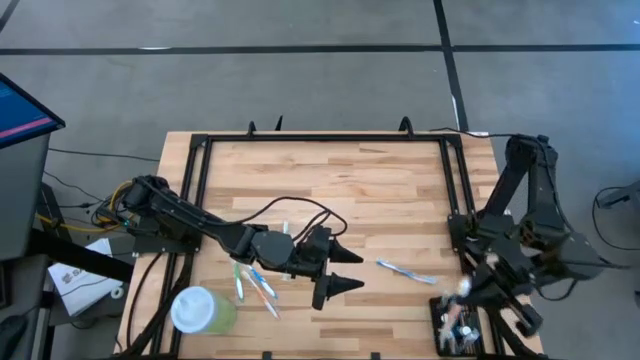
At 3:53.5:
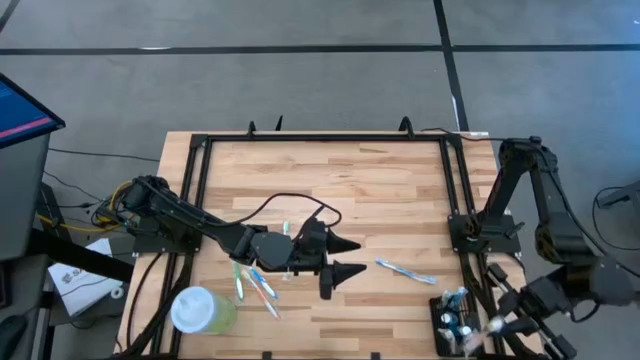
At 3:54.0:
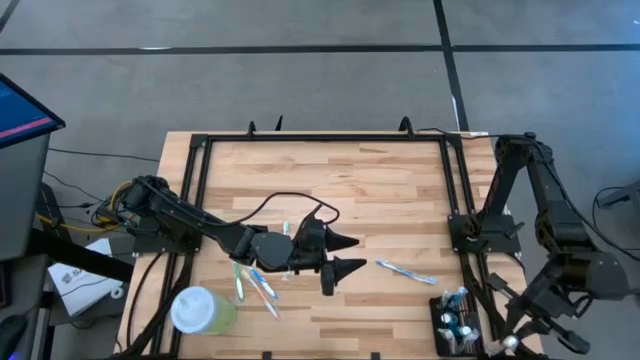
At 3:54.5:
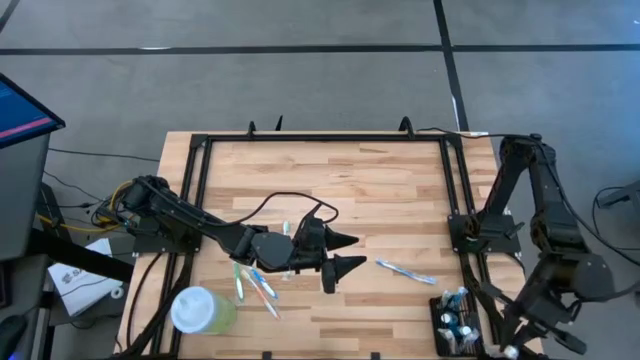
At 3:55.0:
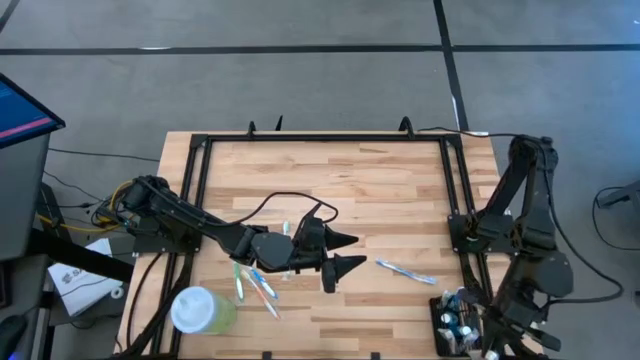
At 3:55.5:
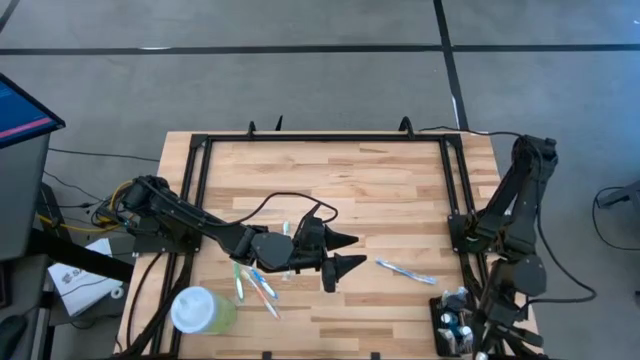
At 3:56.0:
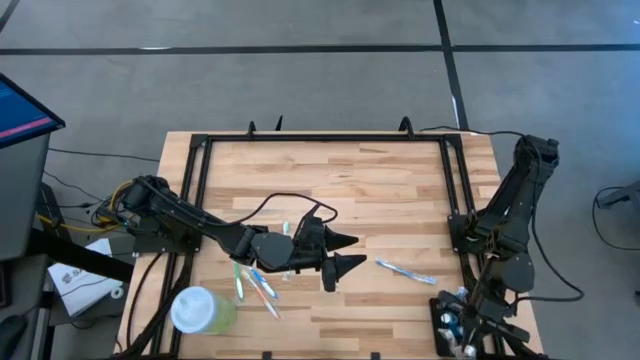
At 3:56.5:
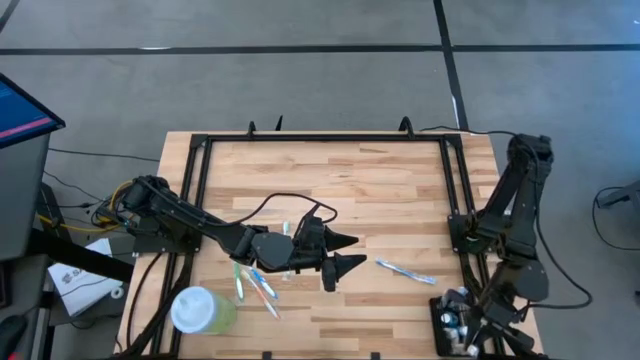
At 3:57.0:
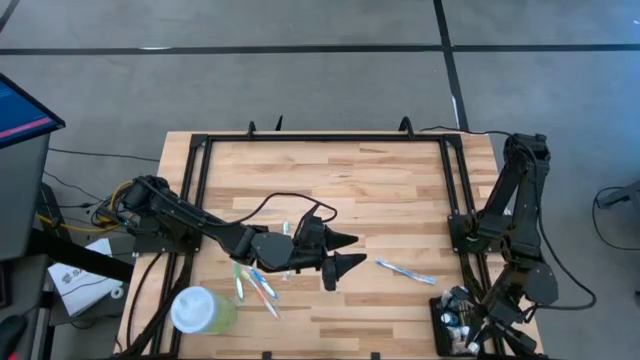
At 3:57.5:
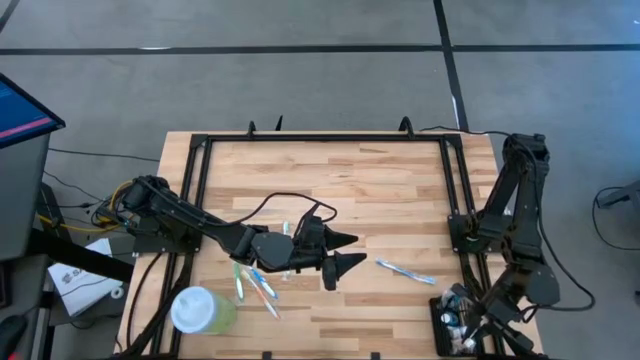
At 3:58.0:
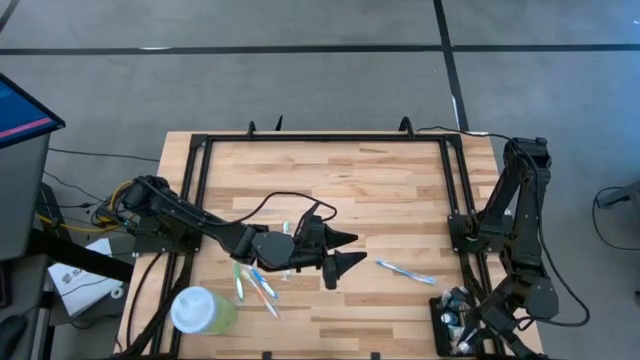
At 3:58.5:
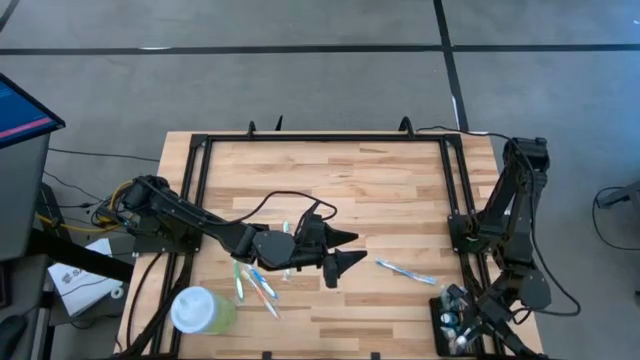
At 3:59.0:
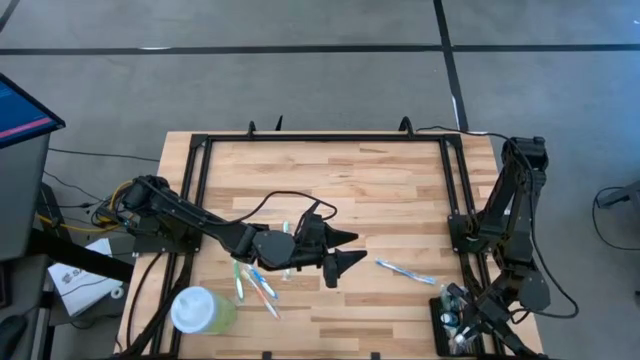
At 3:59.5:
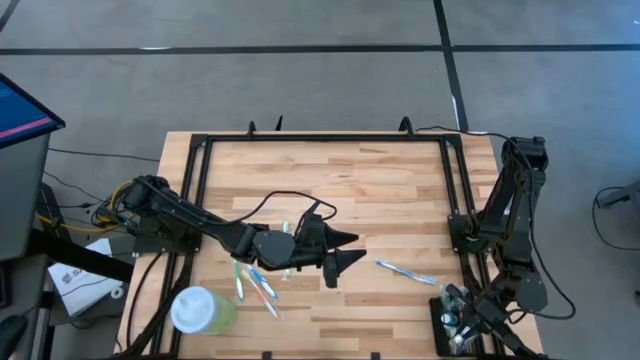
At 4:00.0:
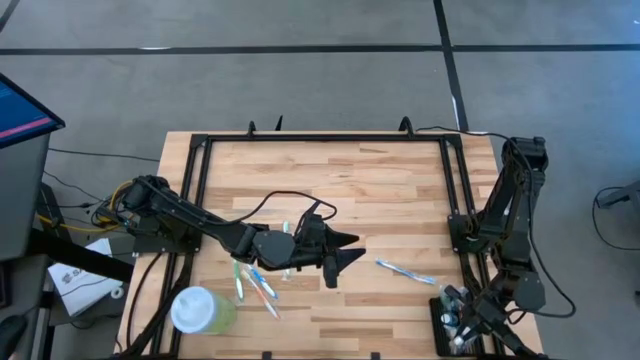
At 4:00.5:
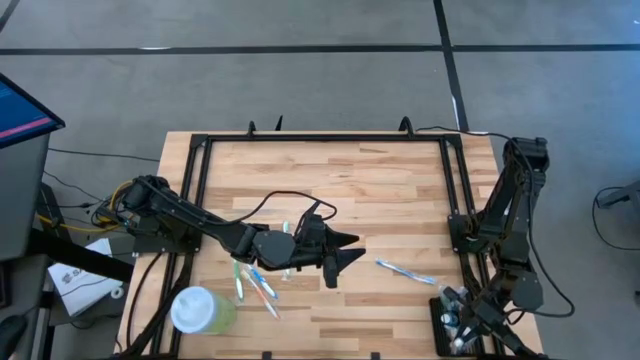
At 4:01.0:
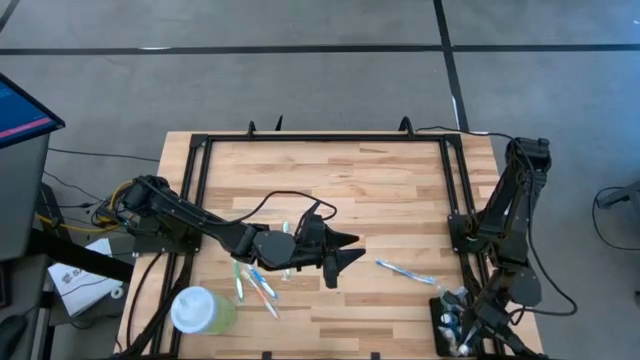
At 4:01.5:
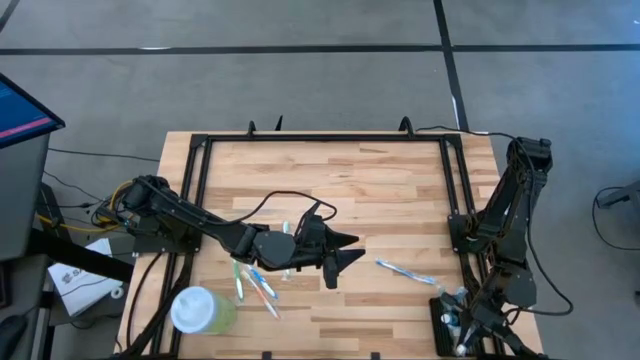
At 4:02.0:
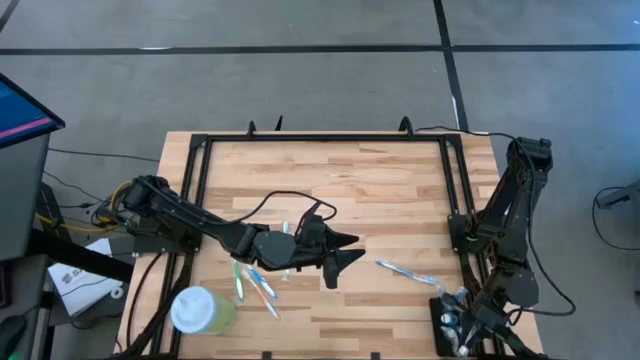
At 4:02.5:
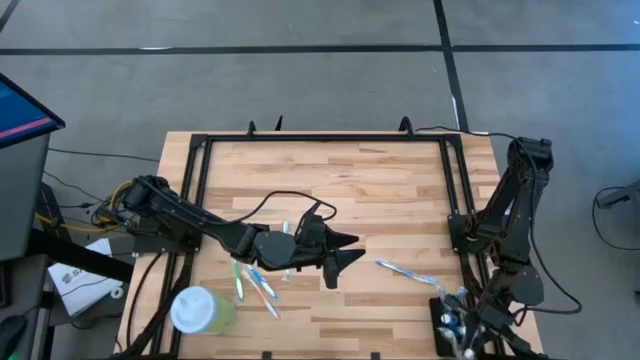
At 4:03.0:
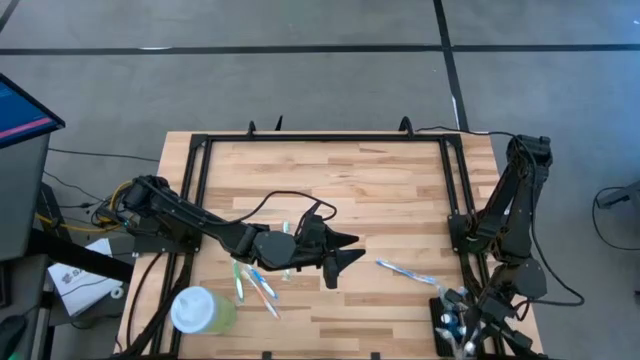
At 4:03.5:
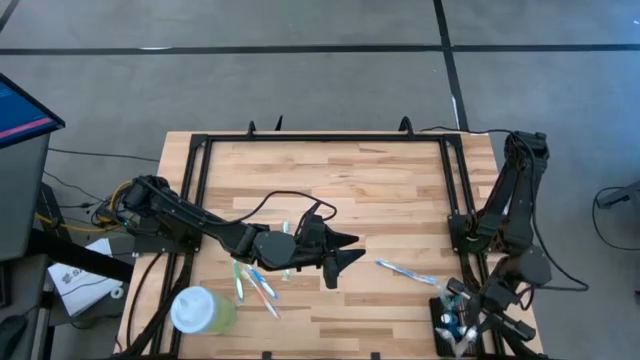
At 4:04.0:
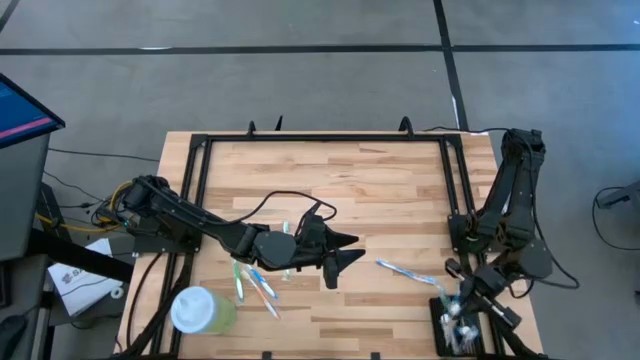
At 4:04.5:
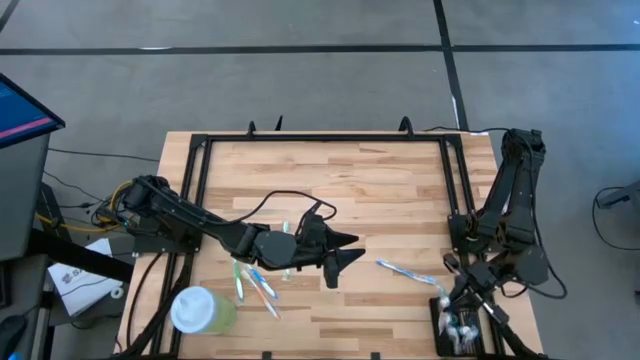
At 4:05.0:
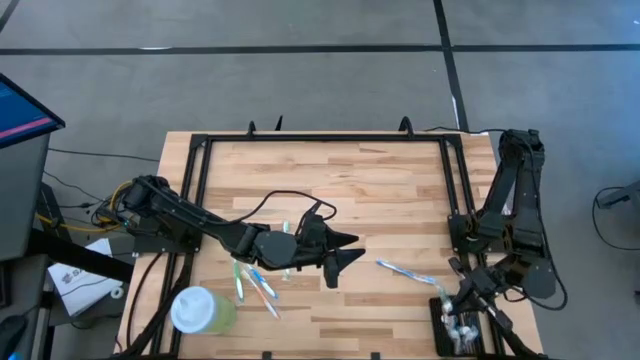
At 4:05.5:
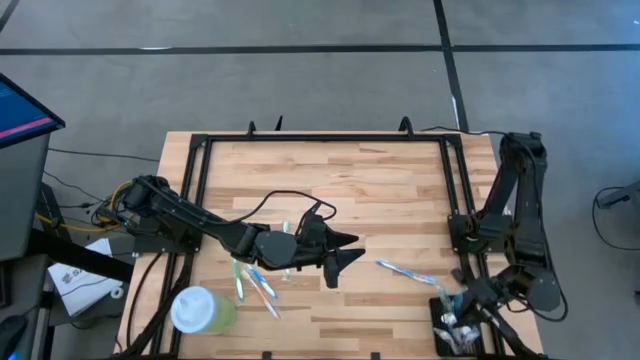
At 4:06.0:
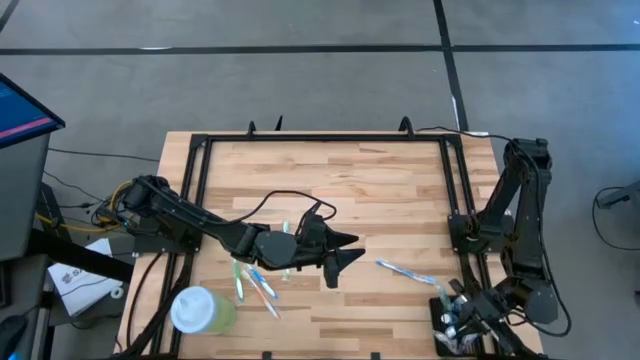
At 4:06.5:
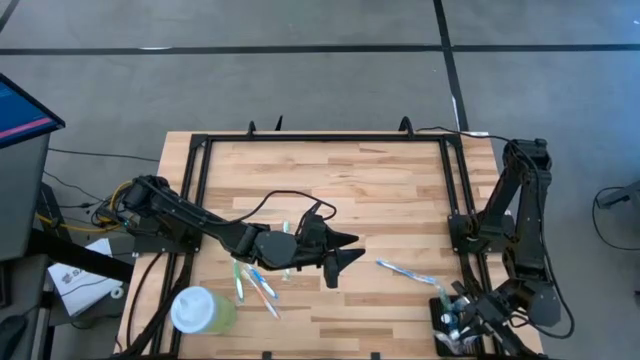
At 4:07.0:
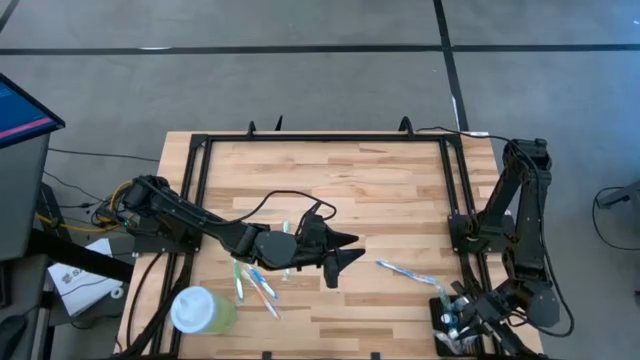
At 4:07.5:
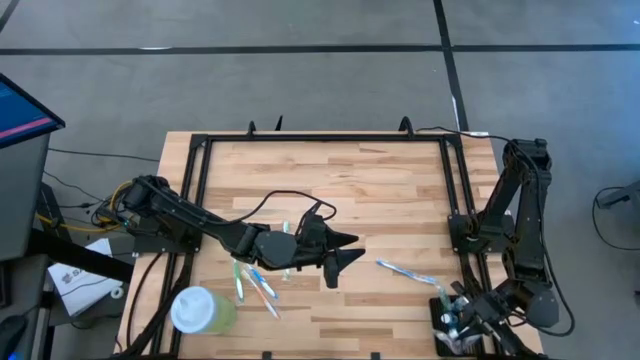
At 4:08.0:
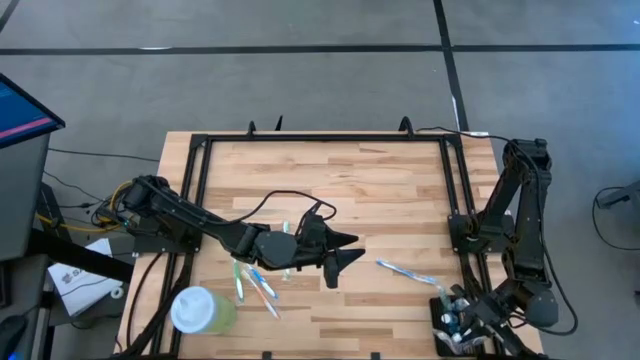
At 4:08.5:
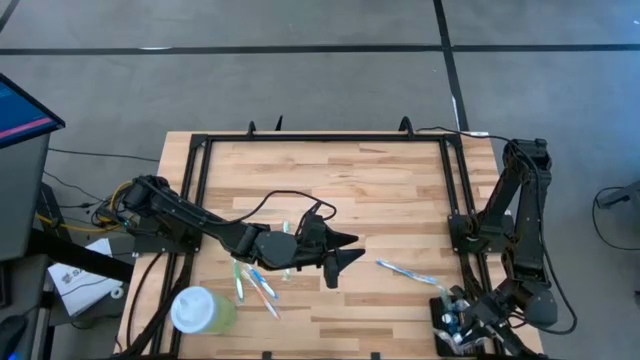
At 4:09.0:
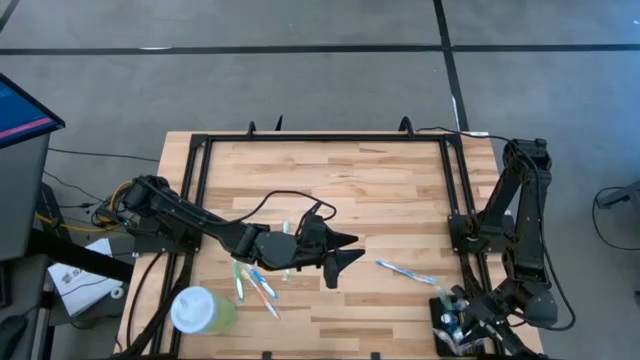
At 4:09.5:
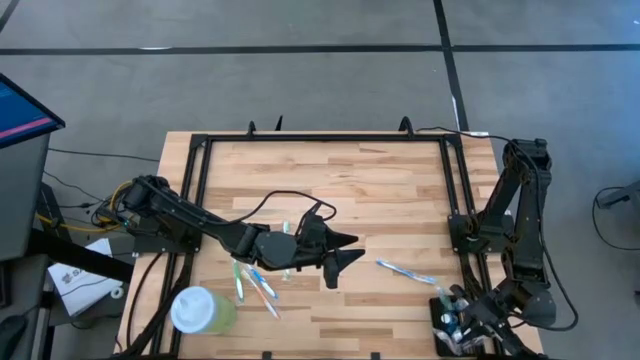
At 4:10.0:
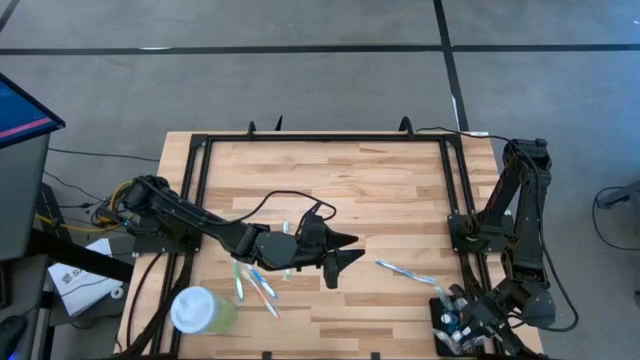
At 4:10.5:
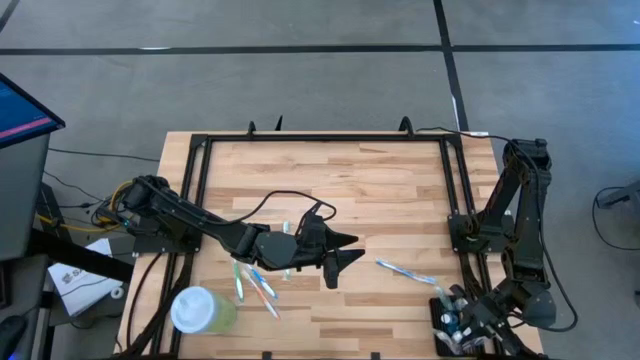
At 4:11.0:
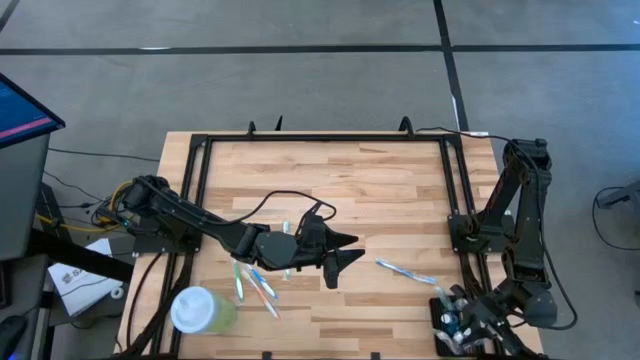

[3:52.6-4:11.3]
Task: Pick & Place toothbrushing station
Put the top orange toothbrush into the black organizer

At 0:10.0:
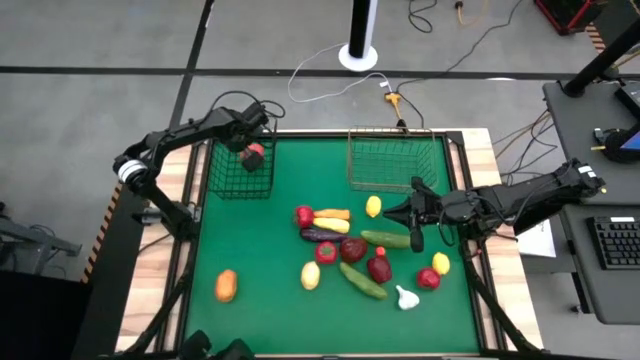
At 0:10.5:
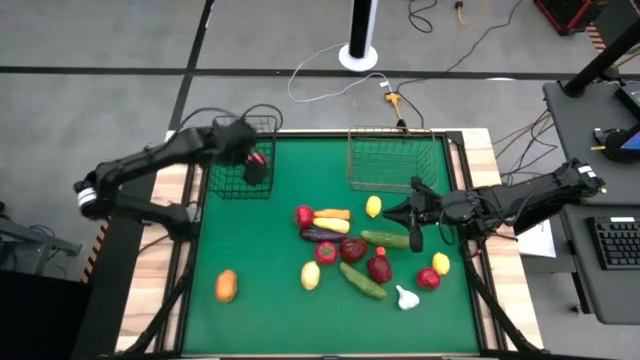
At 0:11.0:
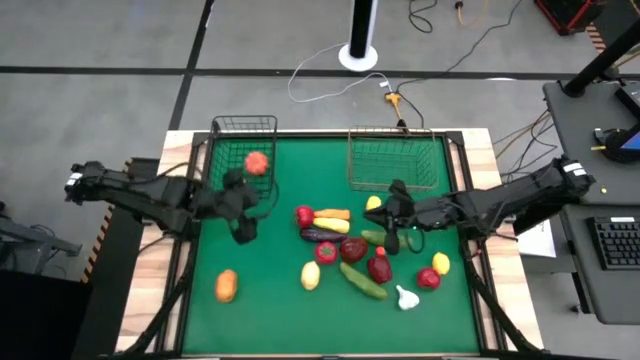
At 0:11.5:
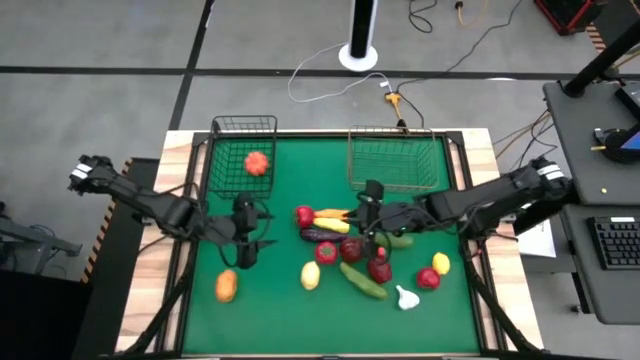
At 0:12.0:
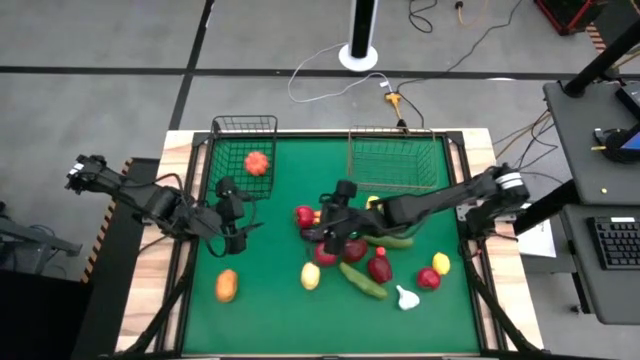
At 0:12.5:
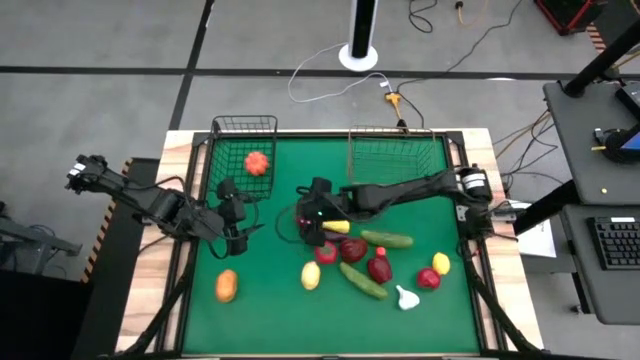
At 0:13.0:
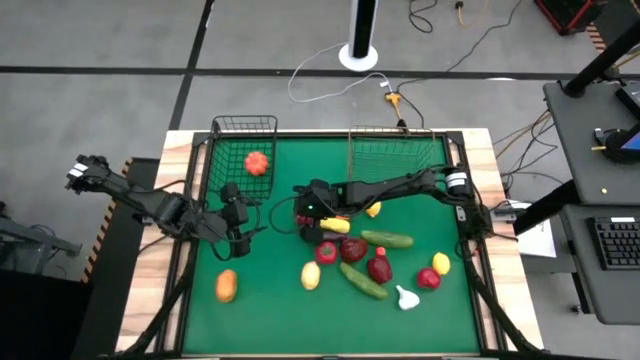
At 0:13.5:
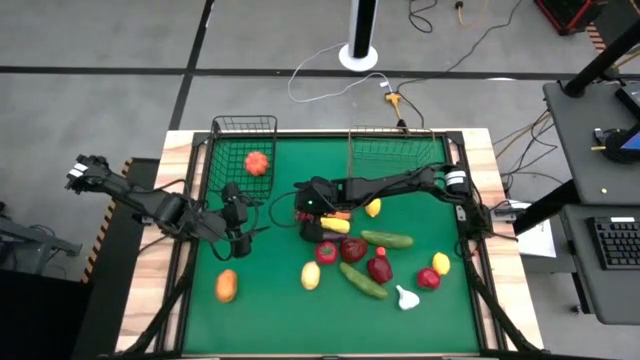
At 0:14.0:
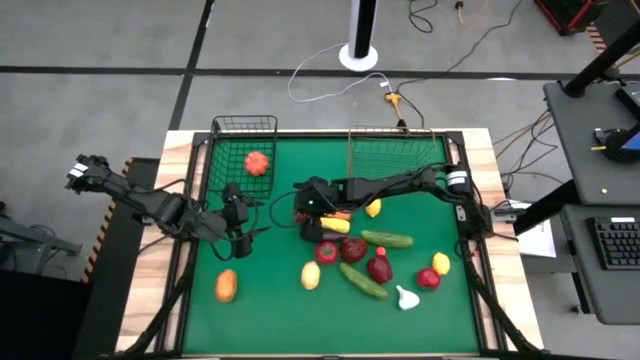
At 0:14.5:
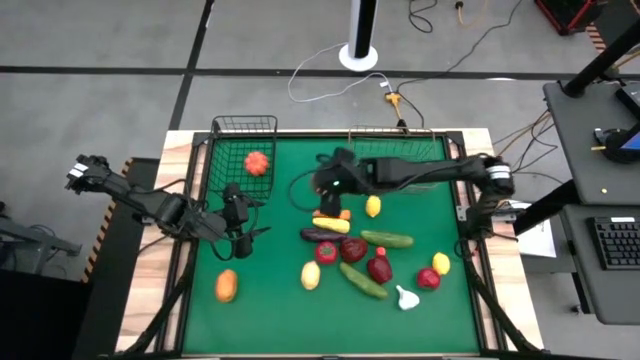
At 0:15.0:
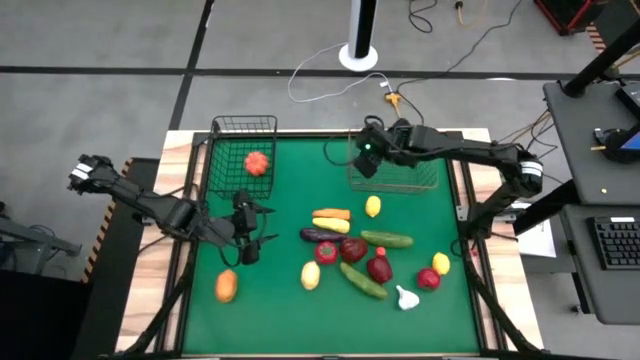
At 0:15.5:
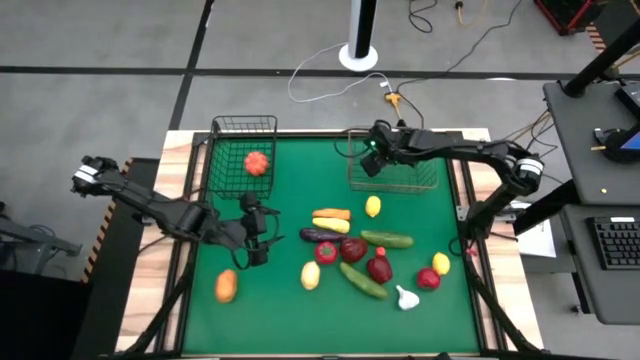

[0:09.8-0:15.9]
Task: Sort produce into baskets
Put the top red tomato into the right wire basket
